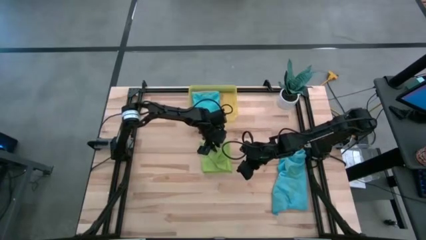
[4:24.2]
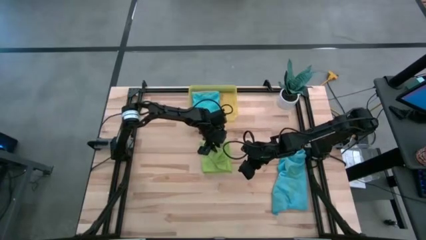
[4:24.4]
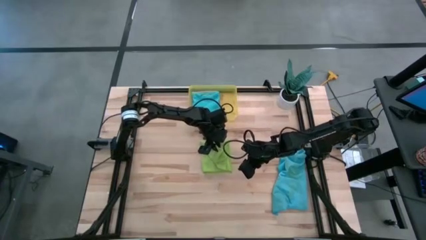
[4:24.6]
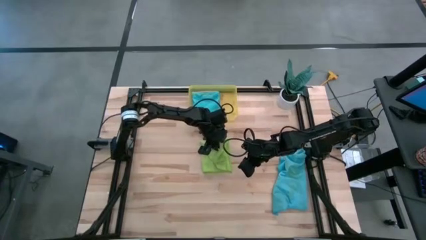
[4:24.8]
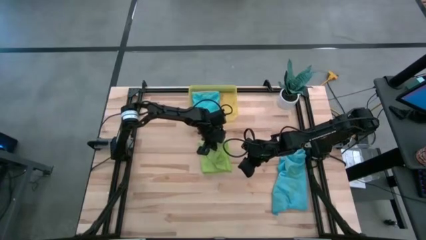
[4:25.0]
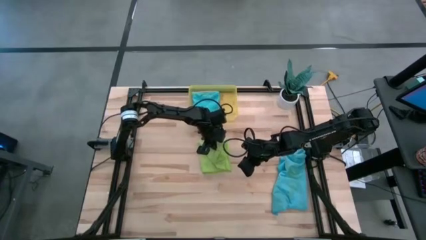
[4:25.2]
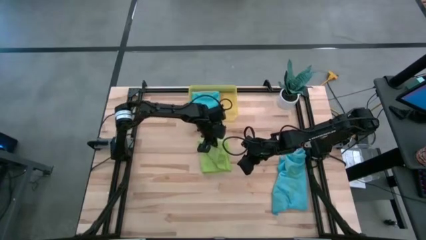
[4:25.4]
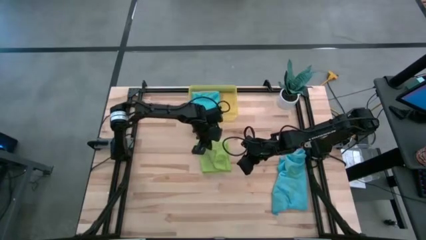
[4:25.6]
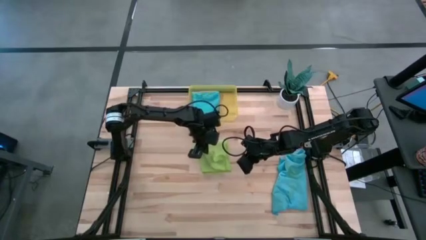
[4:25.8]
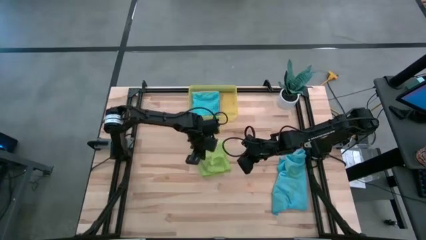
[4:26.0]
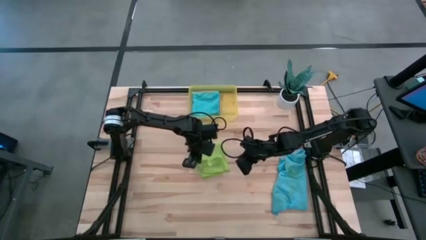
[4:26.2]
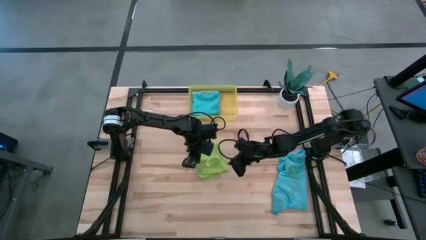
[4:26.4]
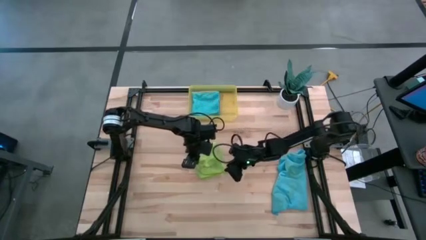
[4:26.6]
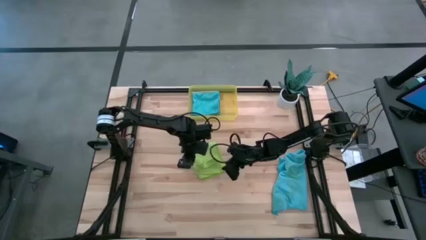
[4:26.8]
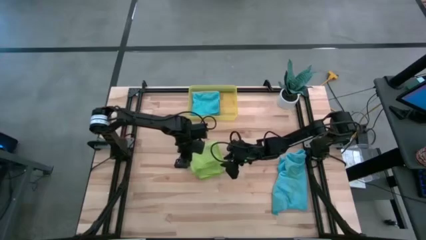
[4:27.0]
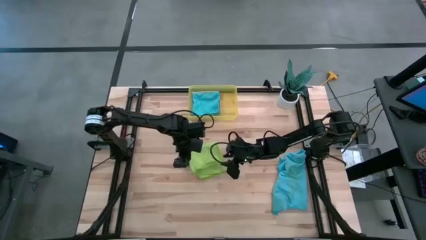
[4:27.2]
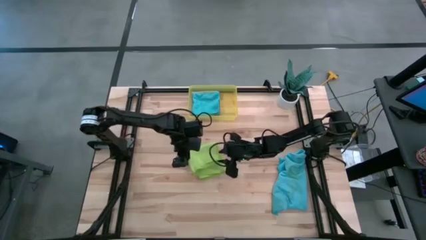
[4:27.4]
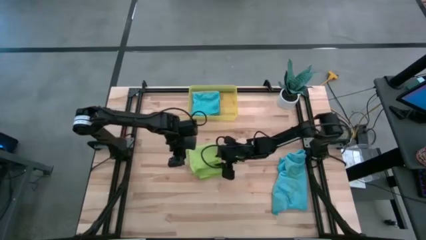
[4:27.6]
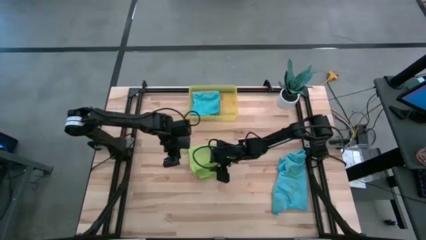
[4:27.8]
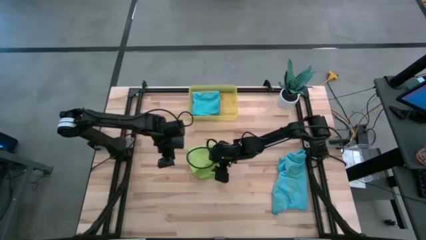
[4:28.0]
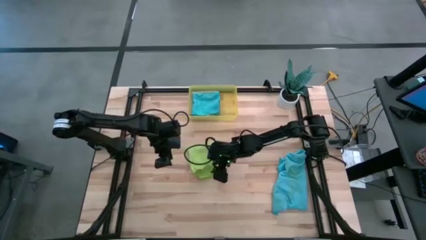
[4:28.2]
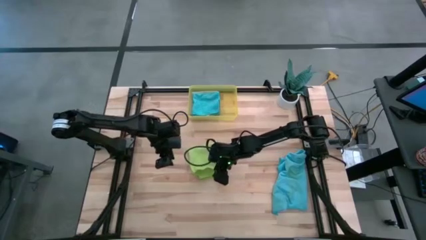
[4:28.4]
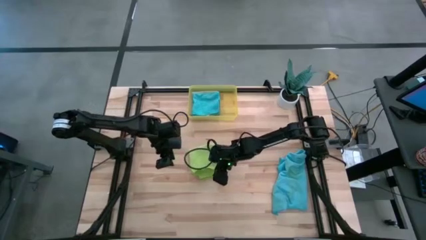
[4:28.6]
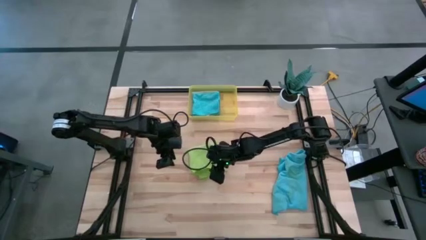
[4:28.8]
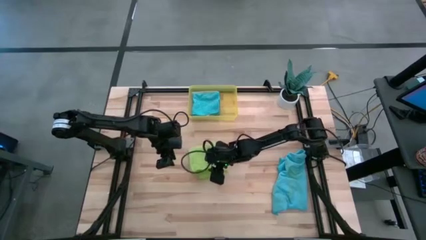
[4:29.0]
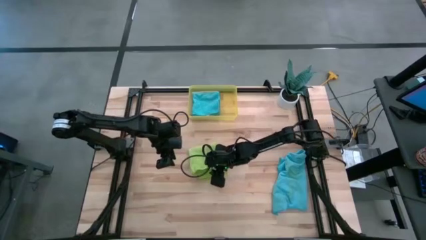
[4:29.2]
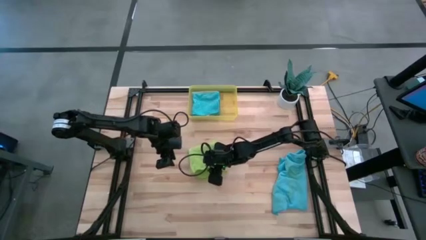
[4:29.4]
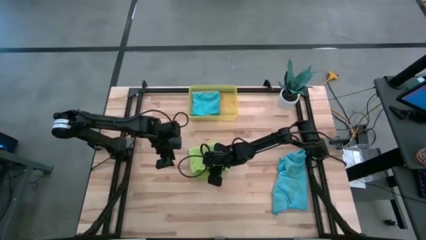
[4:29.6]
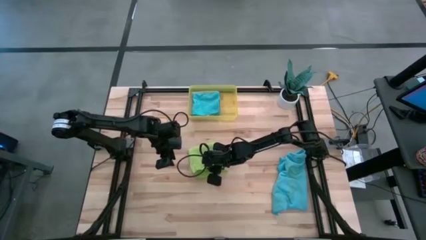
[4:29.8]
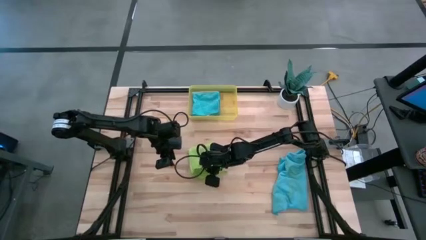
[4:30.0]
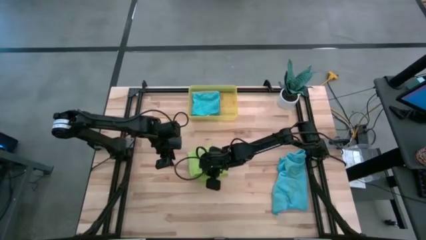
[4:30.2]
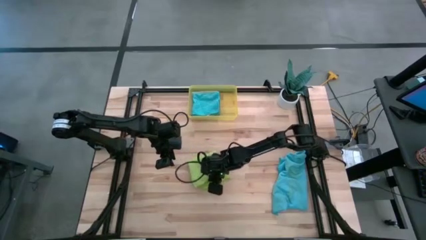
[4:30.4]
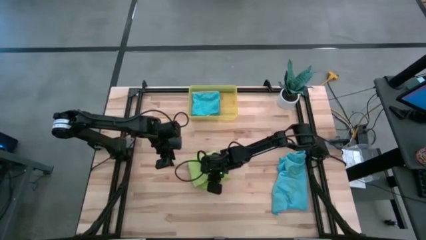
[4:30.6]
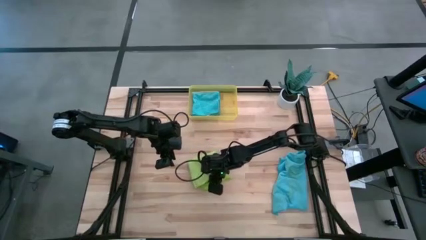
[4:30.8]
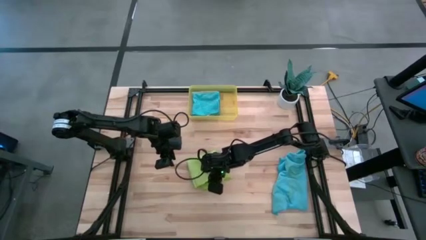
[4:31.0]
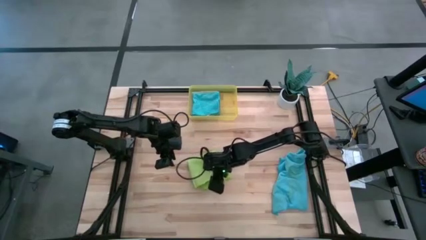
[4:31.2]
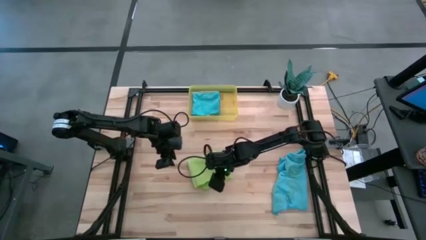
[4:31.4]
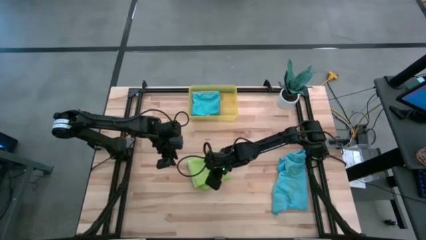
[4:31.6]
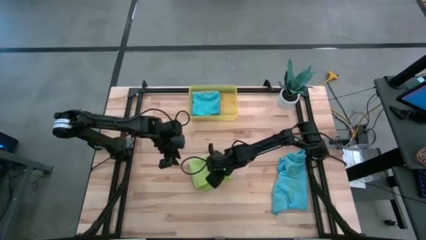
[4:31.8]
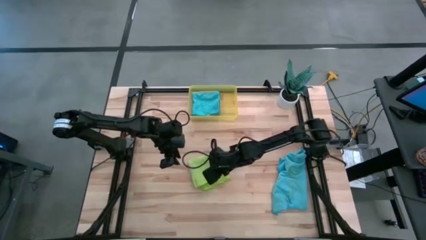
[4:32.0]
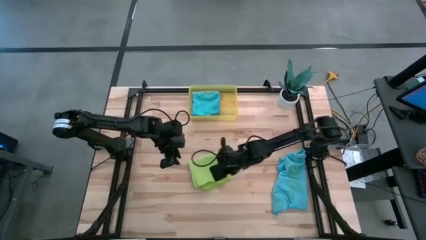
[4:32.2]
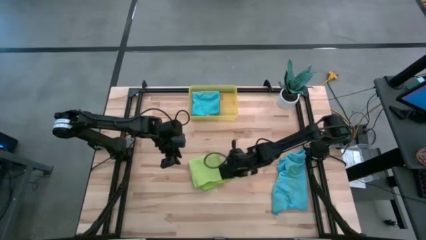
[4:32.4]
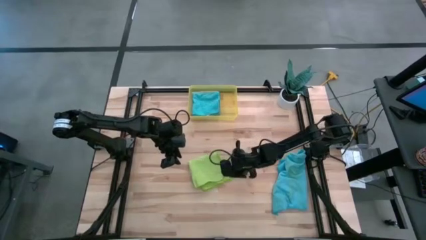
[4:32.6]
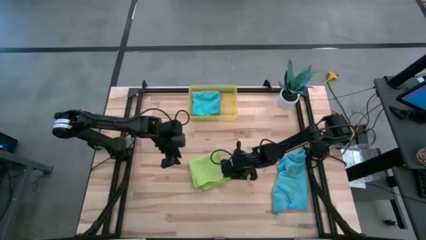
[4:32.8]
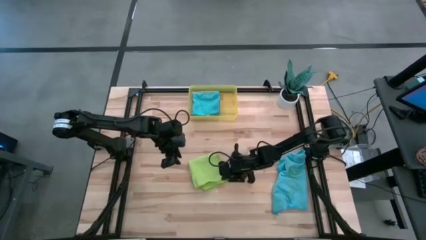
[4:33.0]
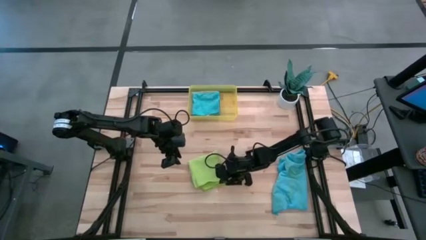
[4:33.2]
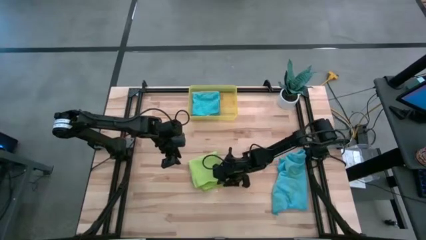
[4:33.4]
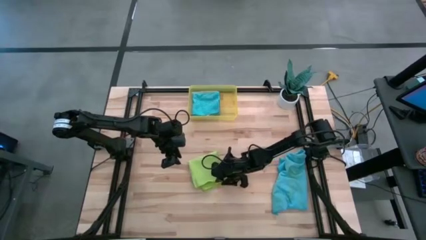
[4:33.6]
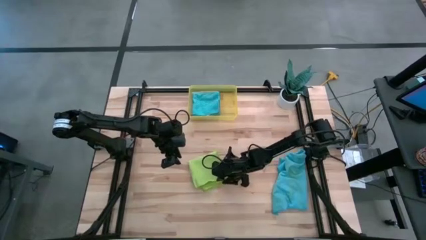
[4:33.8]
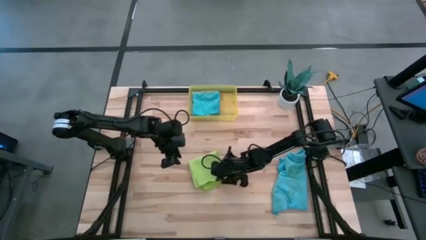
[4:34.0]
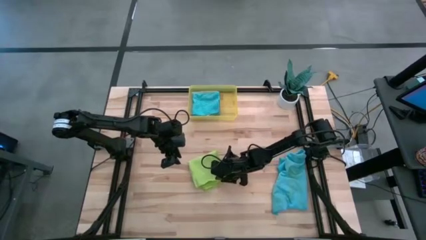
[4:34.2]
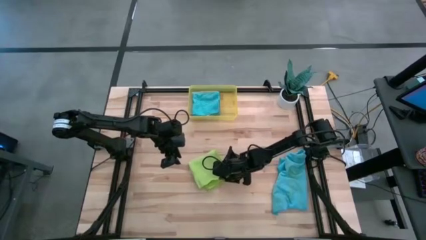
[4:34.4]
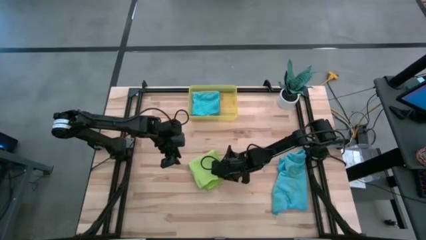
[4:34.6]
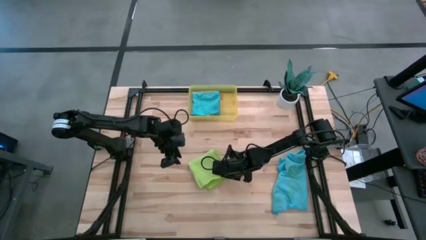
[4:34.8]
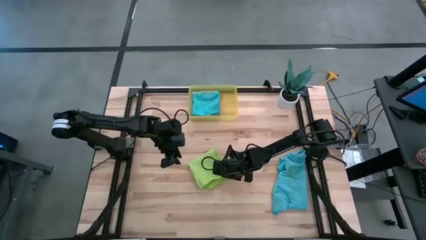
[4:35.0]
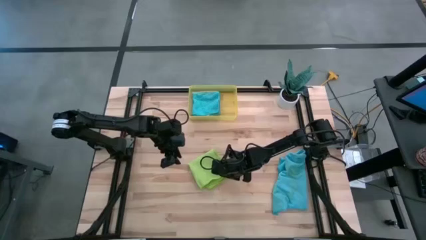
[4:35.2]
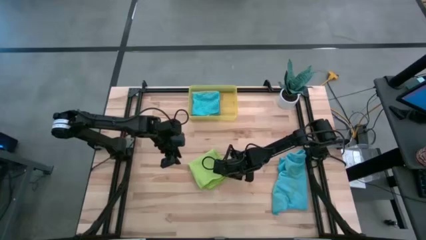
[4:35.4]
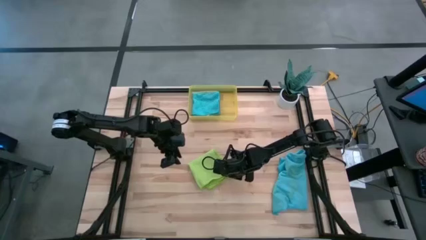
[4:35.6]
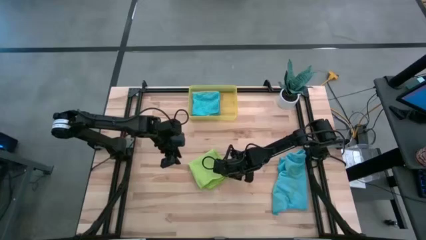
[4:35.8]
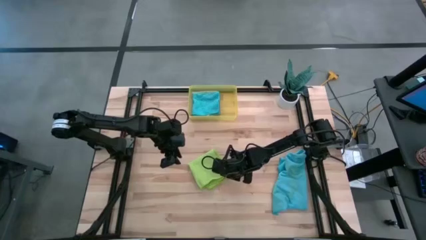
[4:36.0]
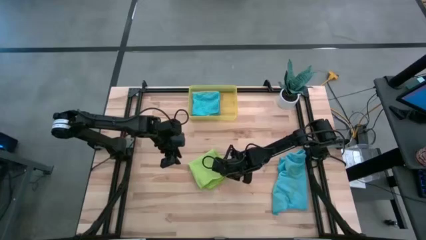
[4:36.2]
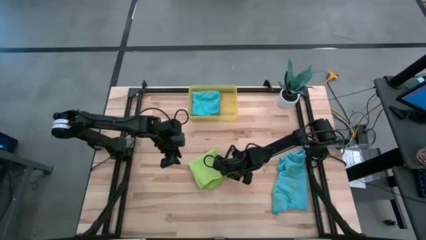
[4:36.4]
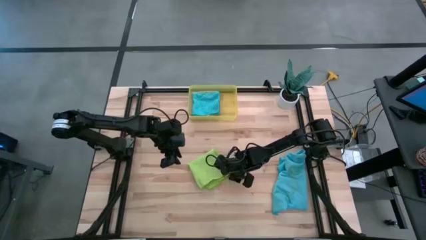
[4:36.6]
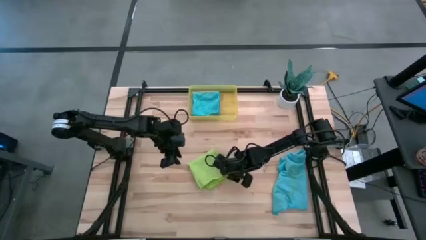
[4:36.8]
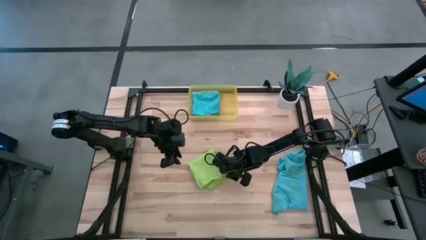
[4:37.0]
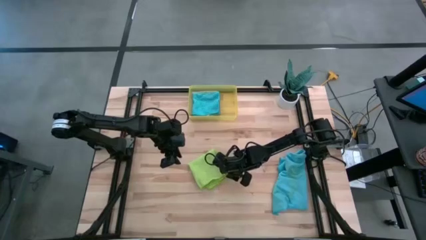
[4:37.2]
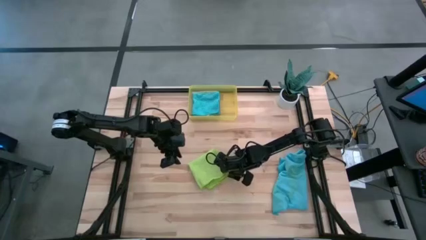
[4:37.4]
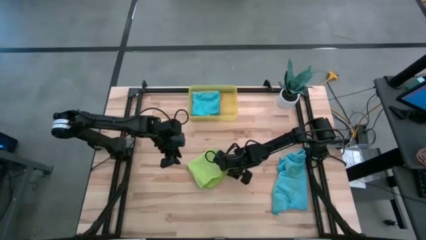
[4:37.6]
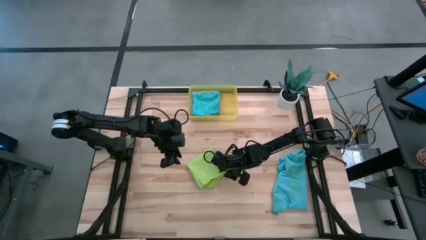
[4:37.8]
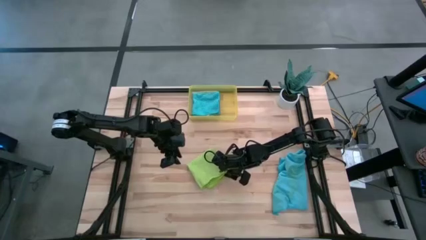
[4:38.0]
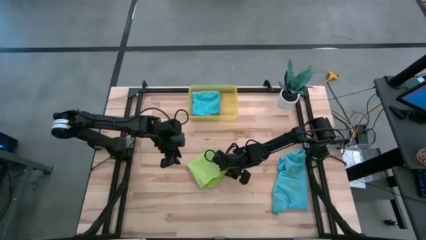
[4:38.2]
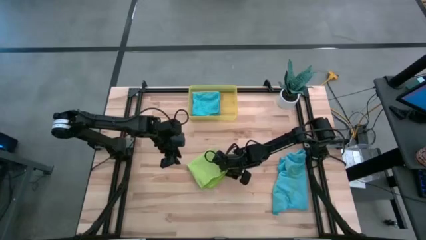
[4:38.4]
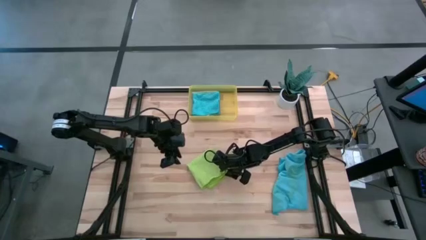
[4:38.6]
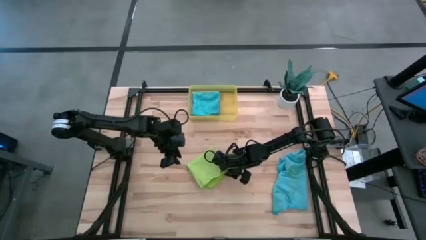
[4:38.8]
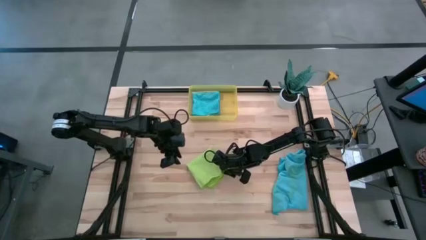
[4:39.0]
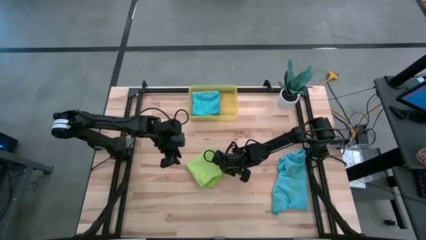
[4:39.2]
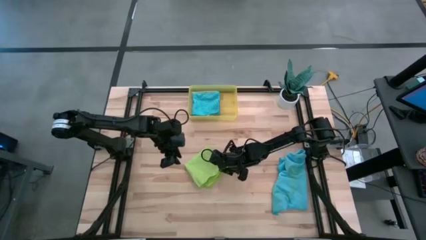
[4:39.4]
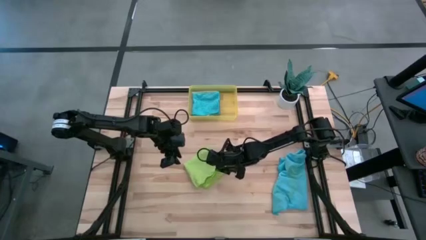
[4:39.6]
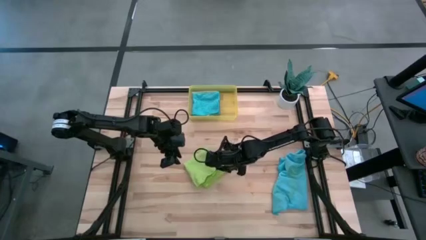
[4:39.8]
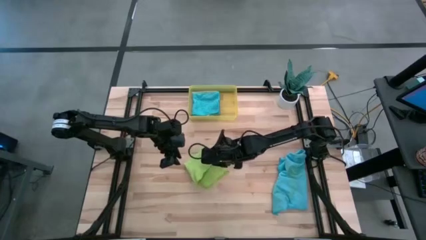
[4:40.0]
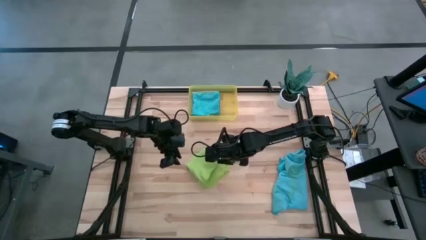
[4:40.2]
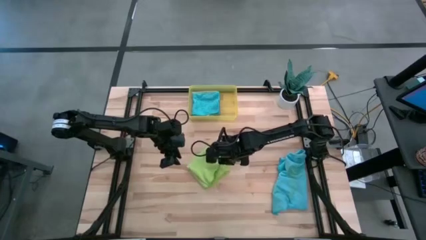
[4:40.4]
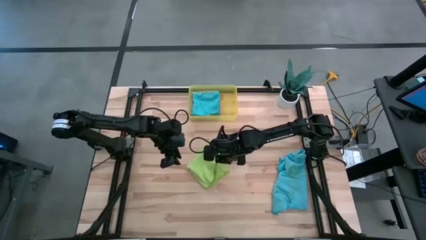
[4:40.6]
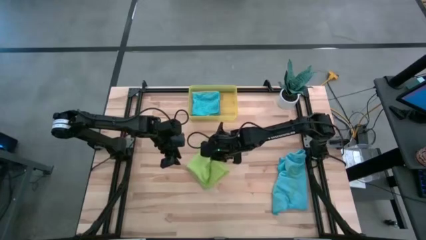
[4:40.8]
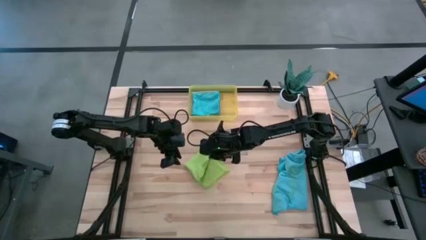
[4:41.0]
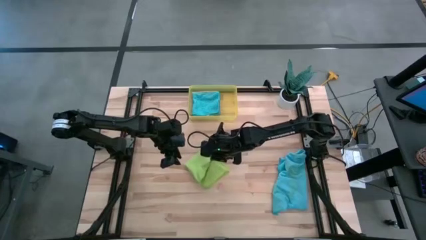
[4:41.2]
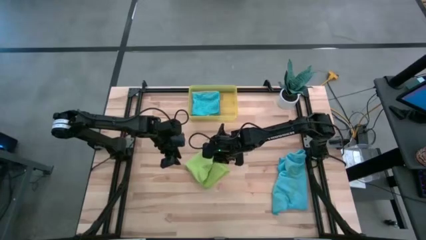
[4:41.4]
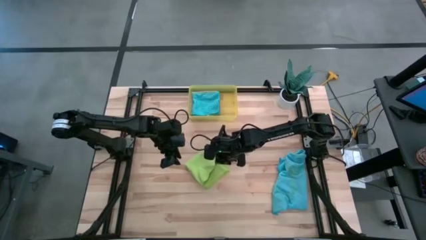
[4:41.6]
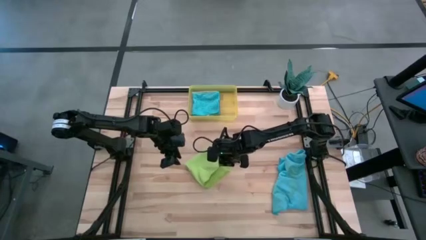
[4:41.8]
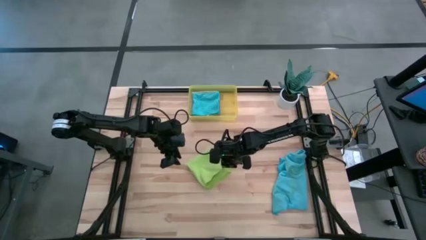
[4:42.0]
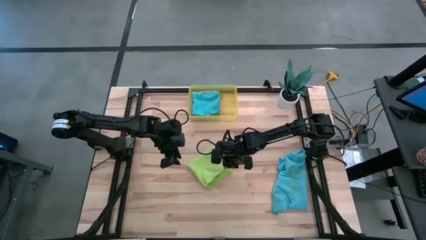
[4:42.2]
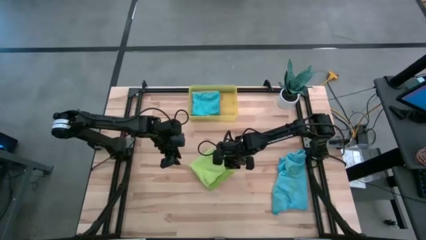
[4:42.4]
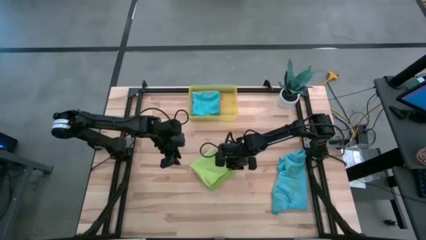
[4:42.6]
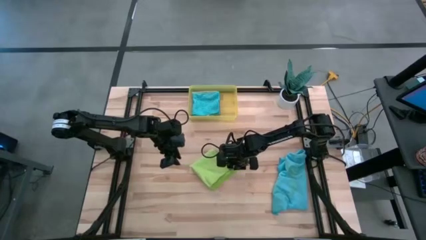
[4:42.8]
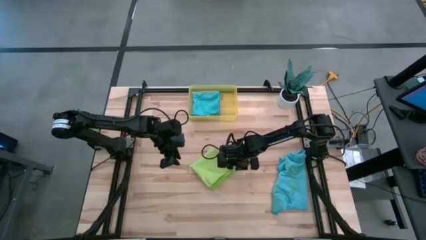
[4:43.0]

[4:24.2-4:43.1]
Task: Fold microfiber towels
Fold the green microfiber cloth
